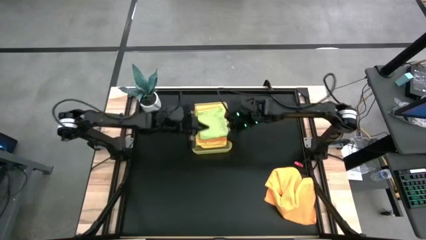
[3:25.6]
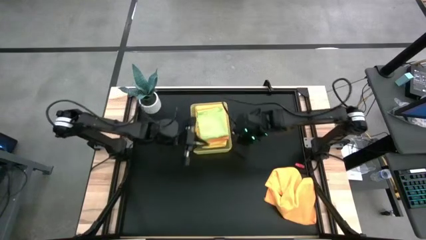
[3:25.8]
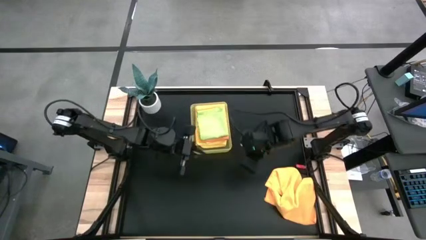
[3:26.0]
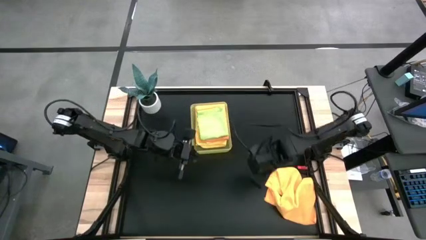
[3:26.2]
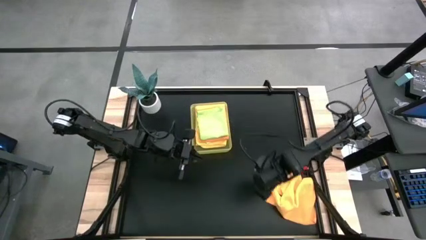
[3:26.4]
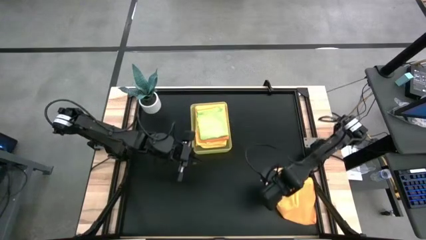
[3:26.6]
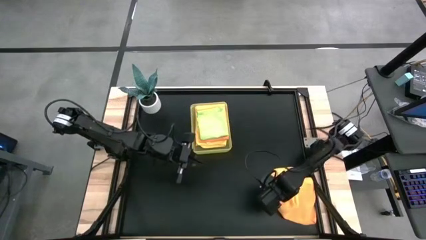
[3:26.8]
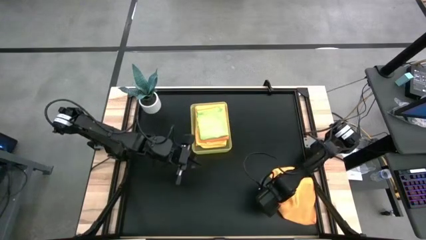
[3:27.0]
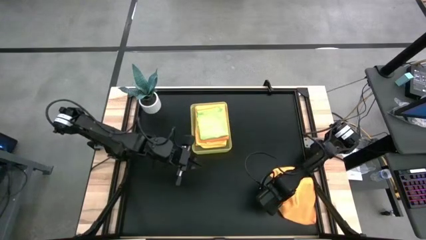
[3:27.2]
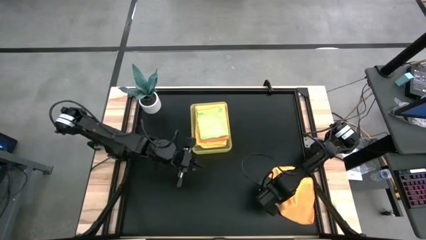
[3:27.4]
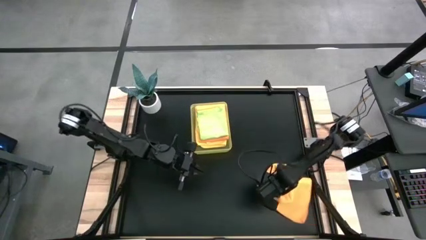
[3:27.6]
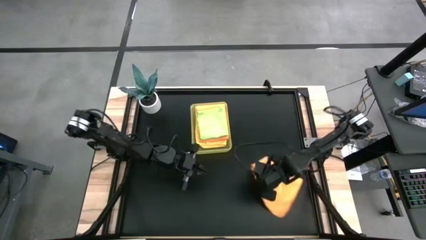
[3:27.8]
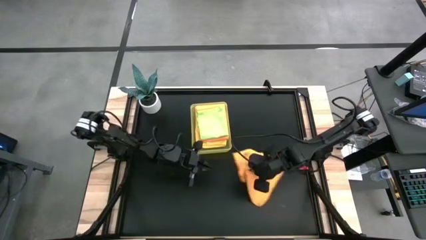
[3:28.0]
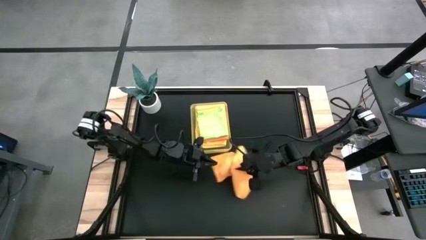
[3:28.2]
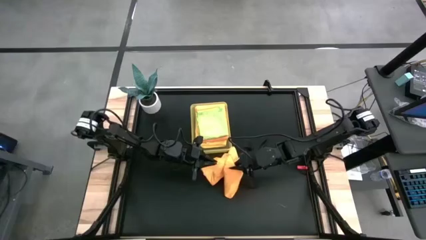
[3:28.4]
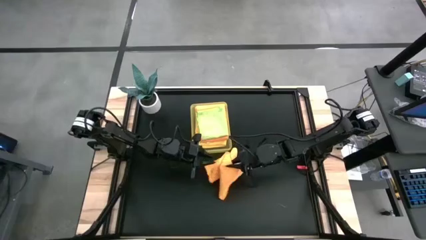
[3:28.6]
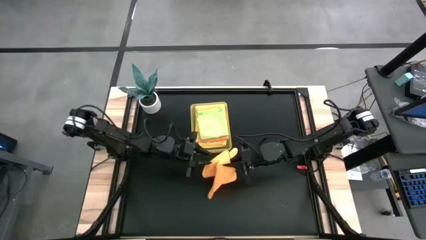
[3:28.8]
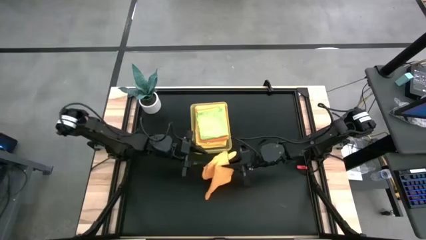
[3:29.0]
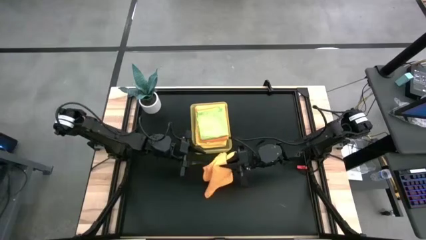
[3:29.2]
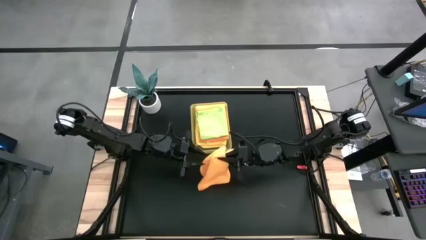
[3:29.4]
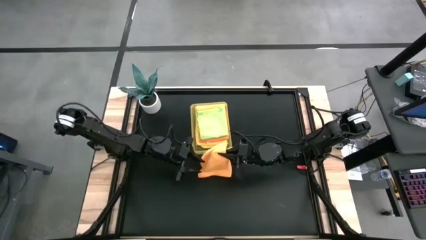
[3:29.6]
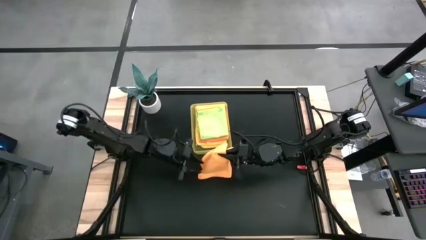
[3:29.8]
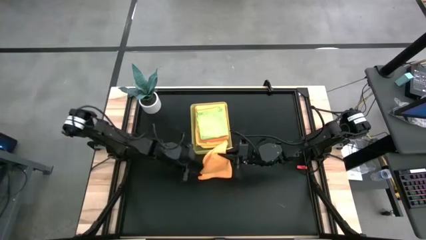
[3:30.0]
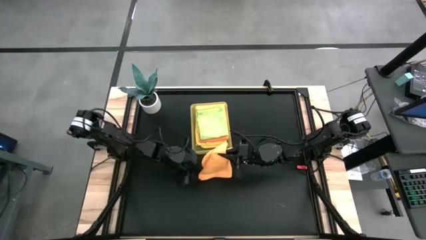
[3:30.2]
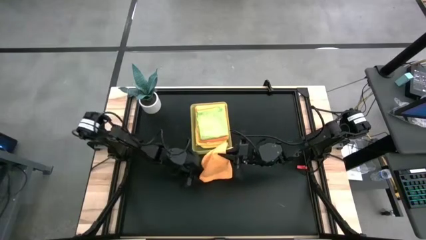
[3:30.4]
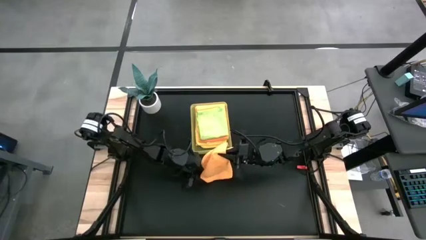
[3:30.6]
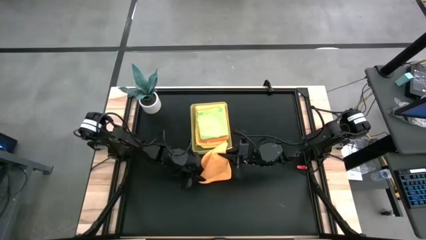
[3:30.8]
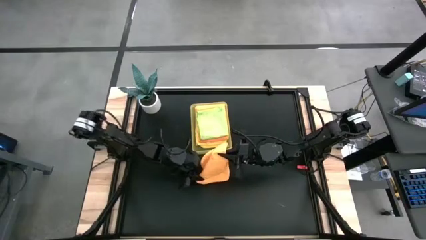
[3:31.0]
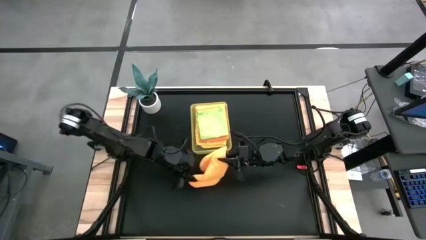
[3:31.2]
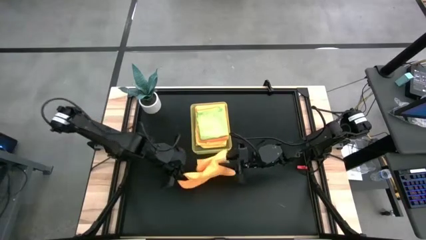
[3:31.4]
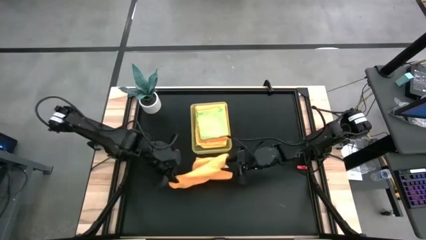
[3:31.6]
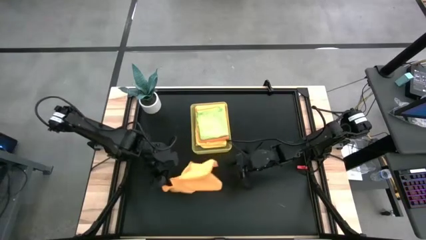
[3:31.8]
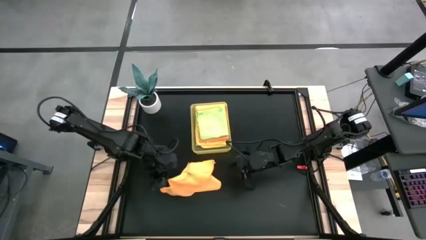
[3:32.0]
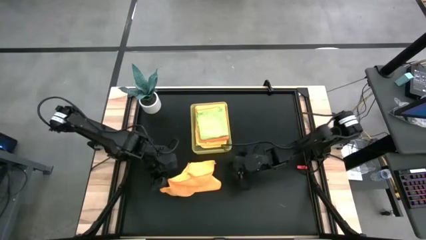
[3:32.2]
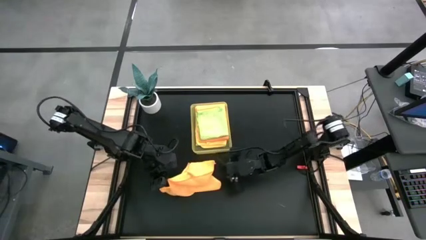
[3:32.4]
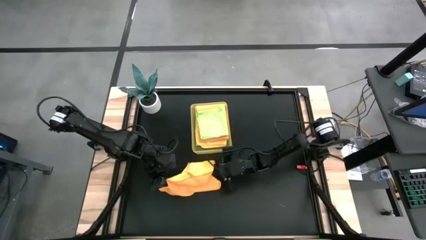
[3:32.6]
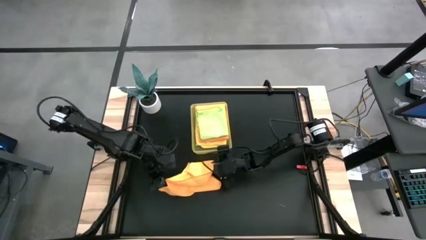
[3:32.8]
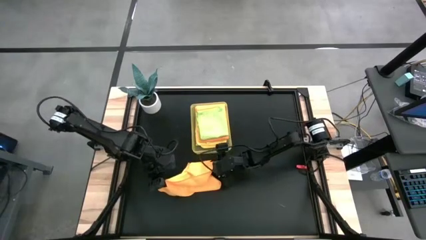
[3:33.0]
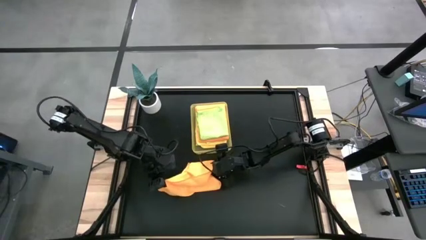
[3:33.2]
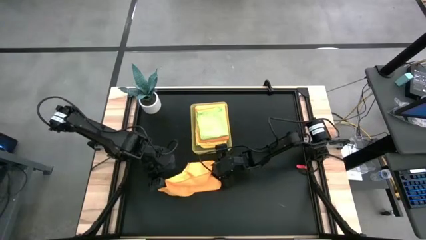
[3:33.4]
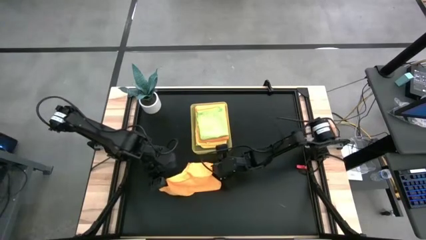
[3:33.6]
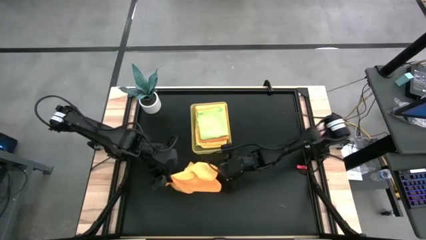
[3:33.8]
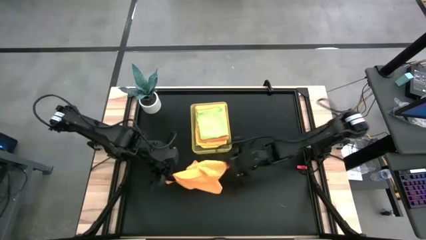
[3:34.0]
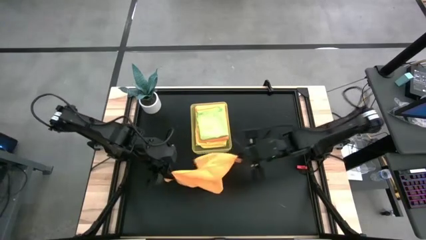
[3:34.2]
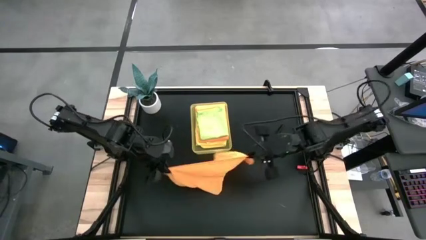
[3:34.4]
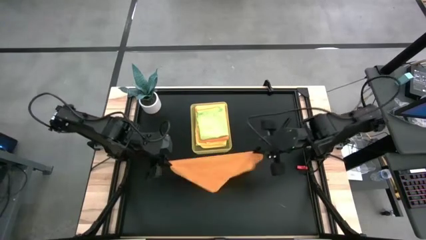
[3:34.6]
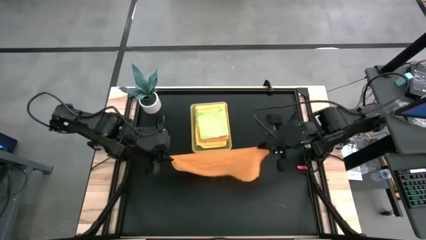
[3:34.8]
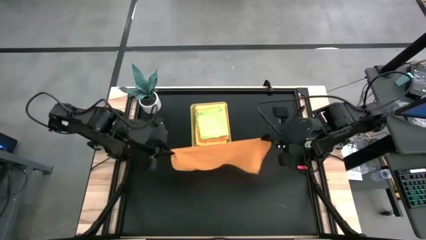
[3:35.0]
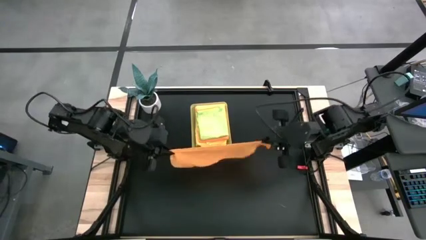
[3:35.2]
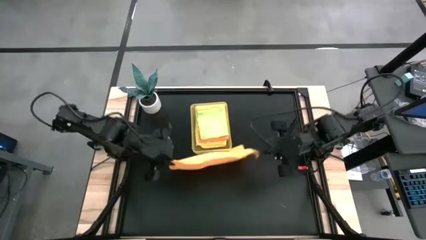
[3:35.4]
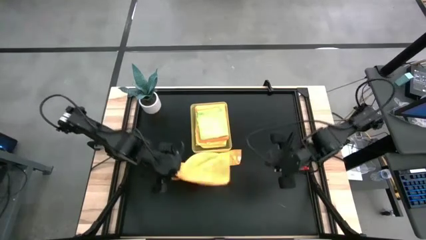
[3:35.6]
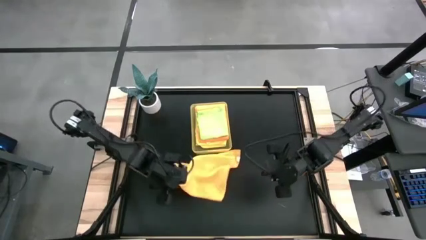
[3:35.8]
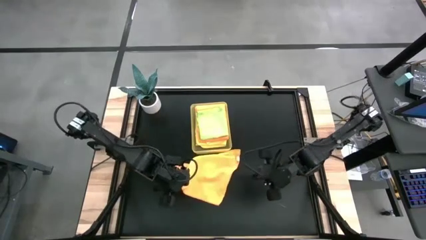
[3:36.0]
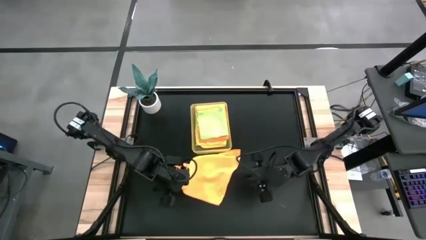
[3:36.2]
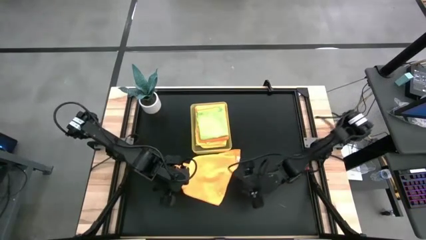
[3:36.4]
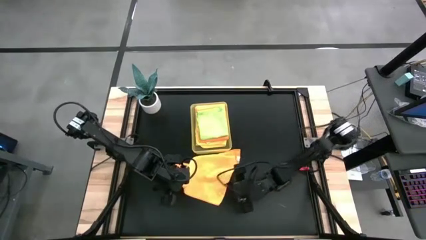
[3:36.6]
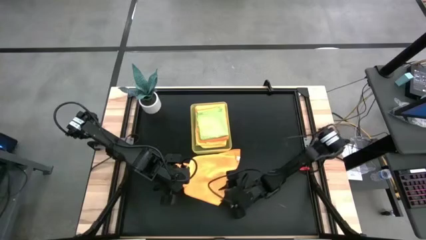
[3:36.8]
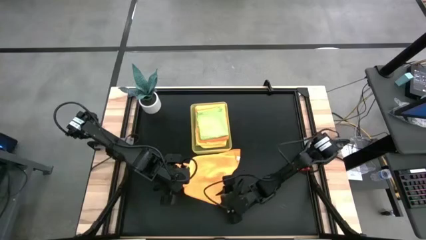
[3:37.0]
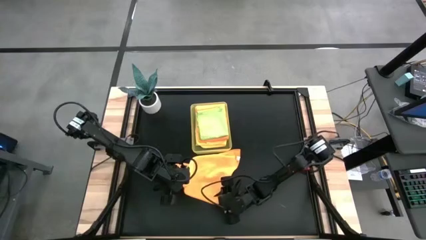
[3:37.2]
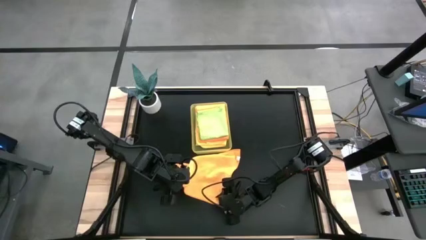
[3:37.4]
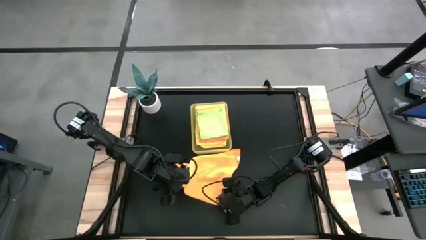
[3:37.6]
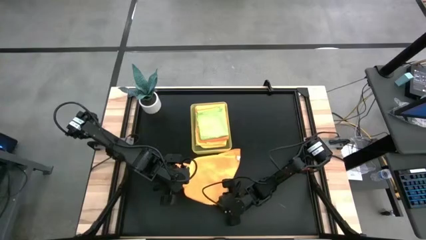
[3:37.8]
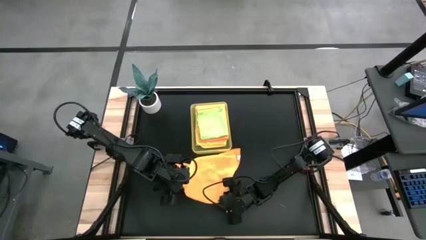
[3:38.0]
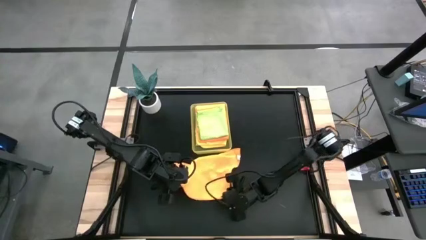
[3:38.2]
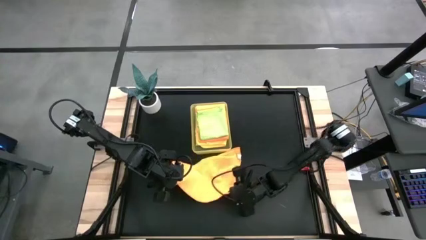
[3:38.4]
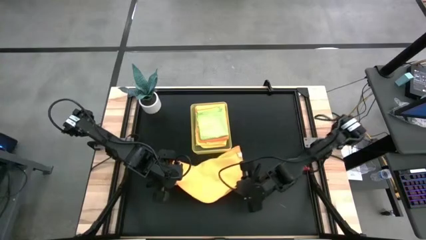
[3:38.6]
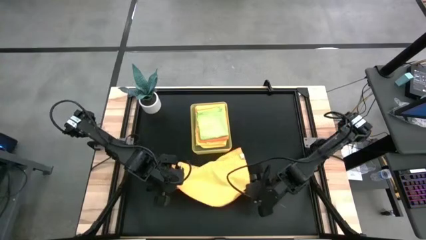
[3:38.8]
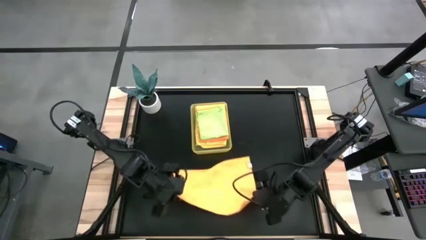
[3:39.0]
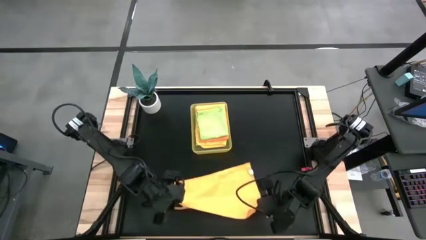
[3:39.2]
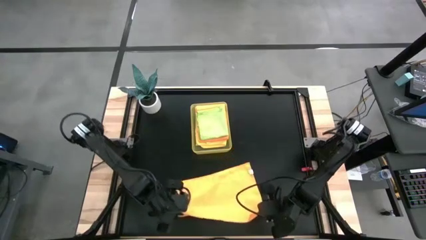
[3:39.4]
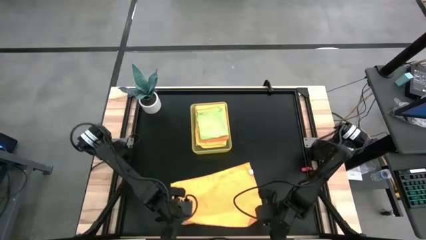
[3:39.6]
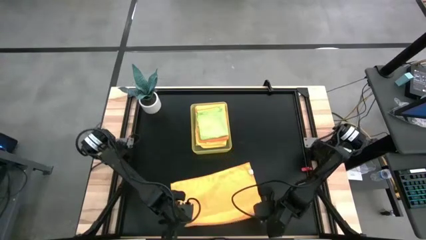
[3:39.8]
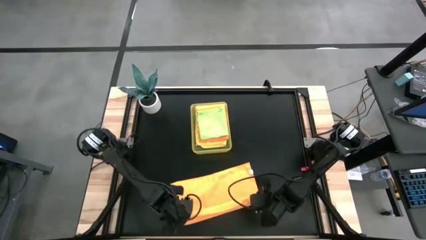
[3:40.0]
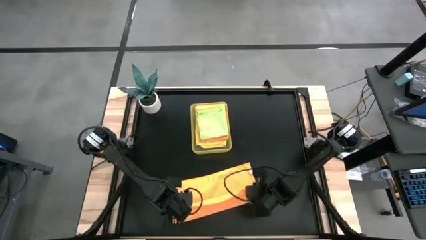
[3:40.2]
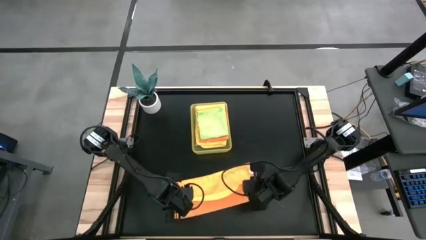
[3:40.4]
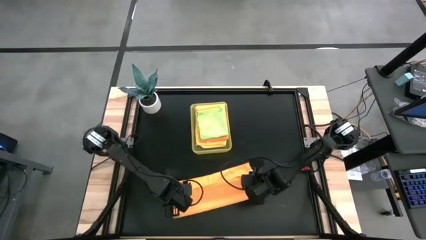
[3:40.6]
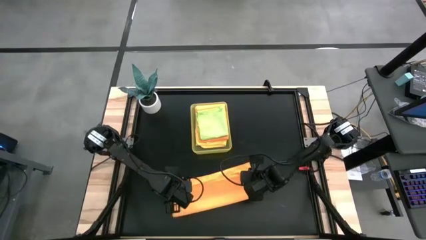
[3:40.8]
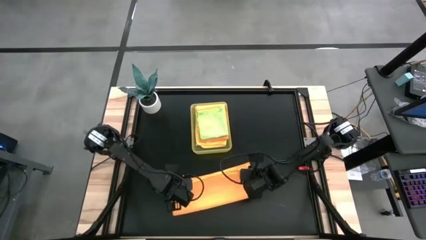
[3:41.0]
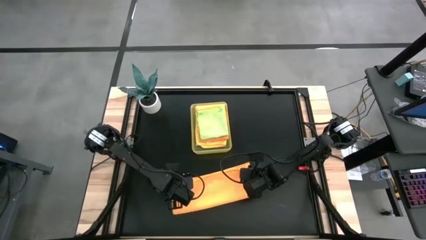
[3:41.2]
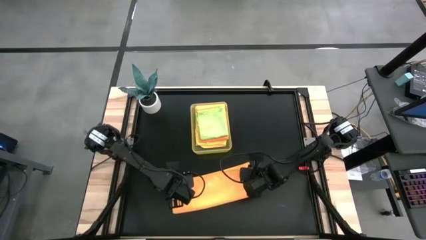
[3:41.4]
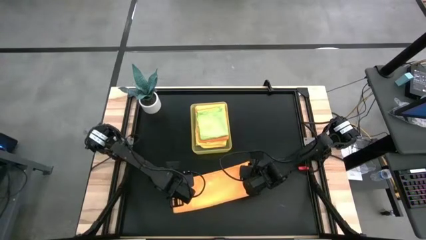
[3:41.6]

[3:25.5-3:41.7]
Task: Fold microfiber towels
Fold the orange microfiber cloth

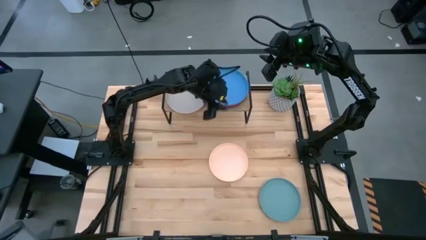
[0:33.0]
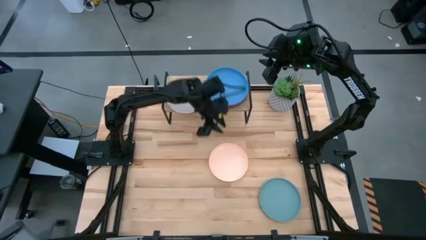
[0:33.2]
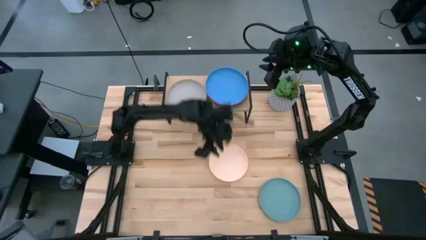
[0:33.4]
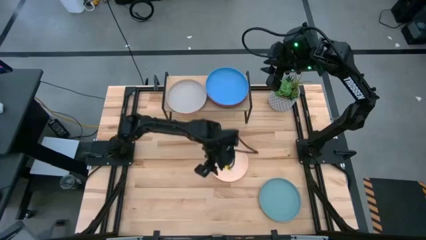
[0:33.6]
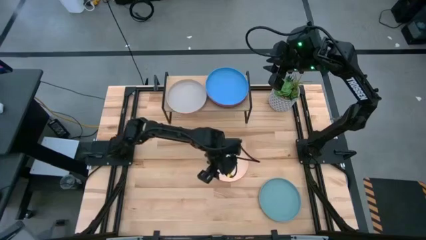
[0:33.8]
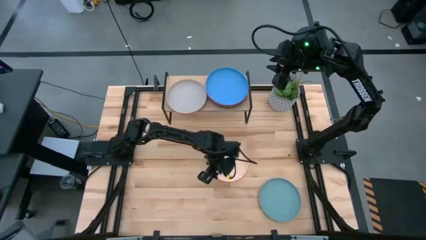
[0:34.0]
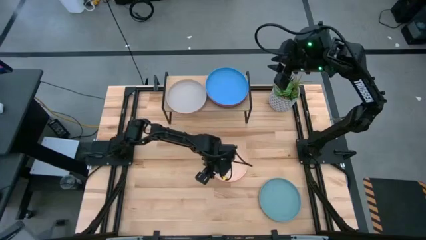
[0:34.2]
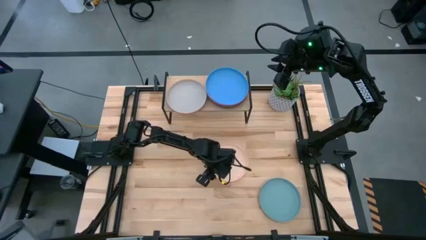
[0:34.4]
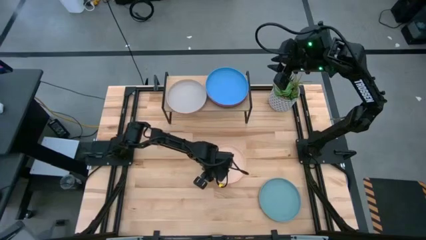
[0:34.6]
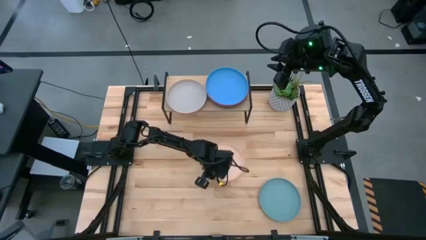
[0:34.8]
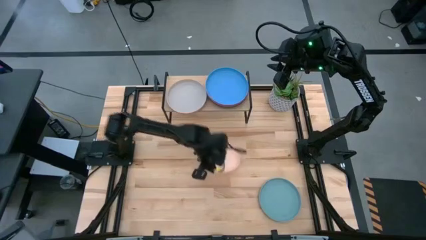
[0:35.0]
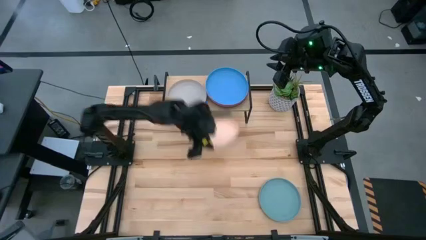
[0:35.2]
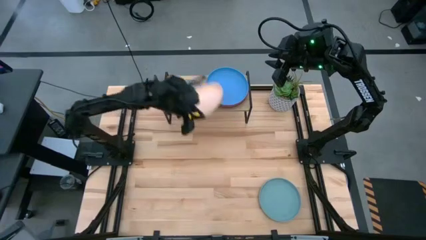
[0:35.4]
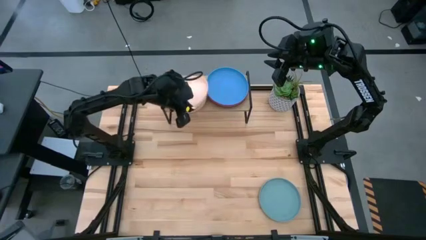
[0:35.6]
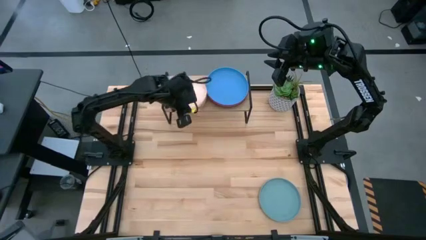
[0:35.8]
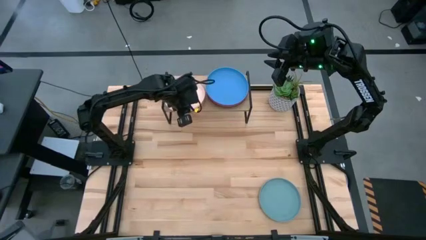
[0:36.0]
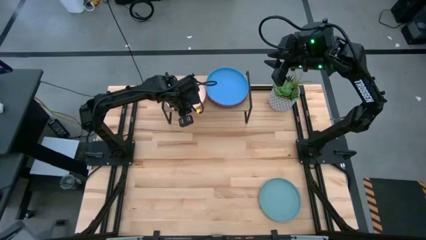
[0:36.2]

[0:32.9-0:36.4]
Task: Place and stack plates onto a shelf
Stack the light orange plate on top of the gray plate on the shelf
